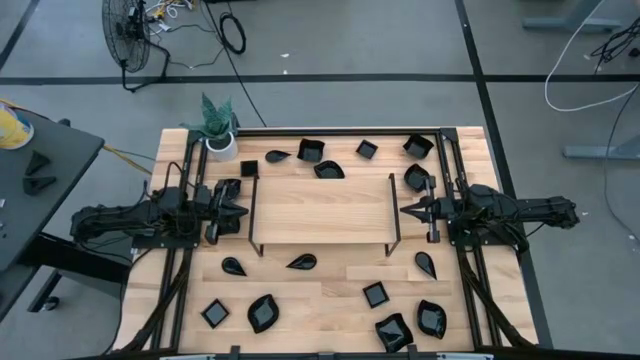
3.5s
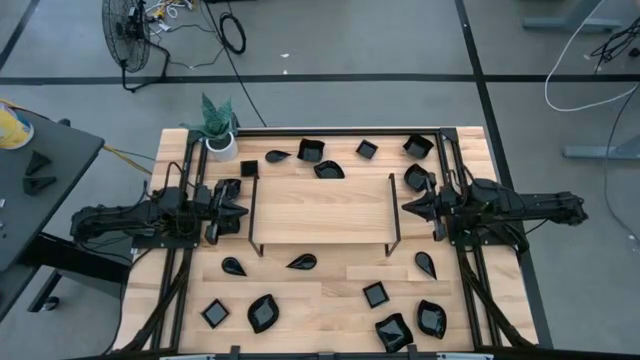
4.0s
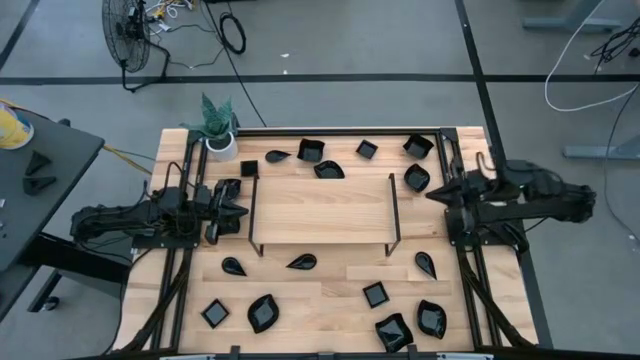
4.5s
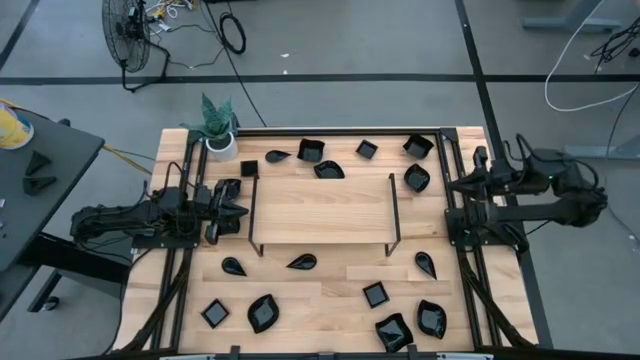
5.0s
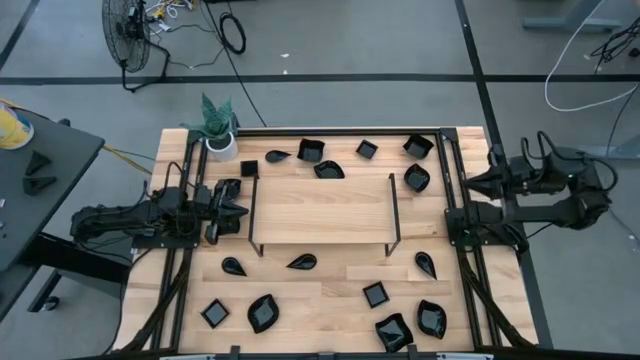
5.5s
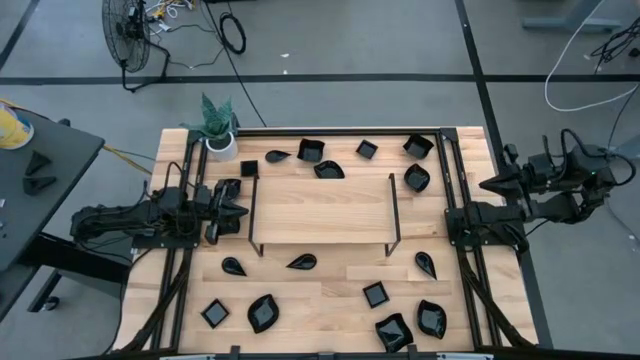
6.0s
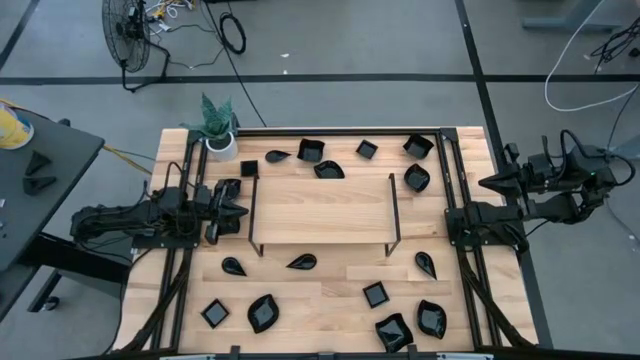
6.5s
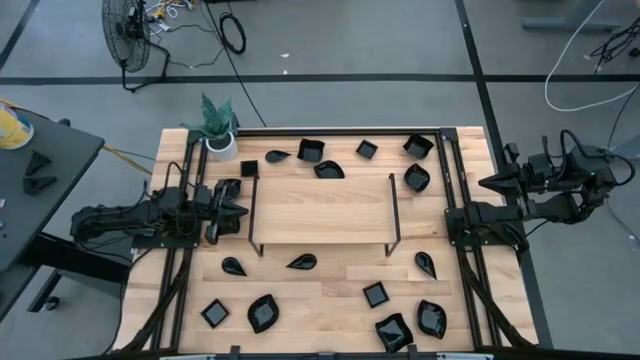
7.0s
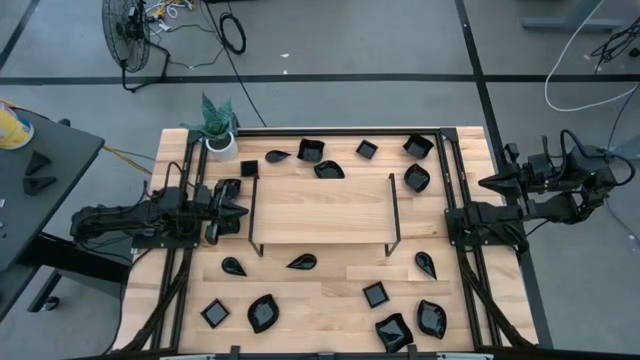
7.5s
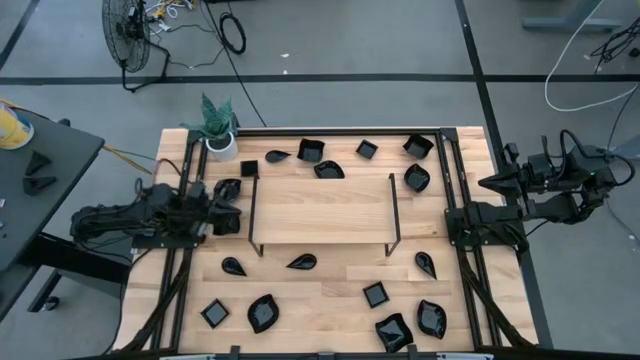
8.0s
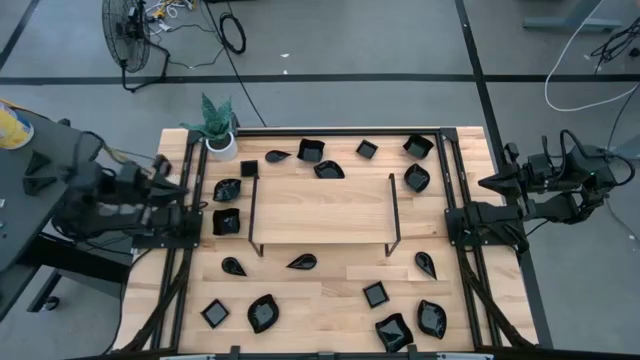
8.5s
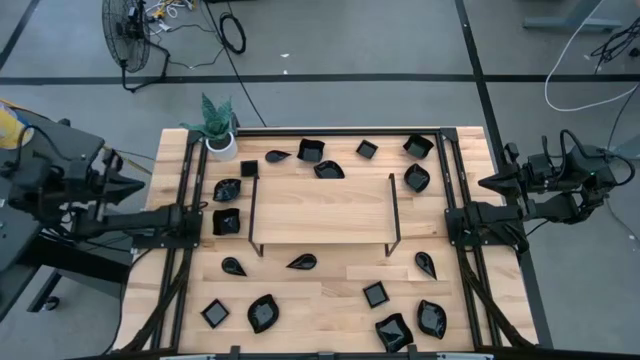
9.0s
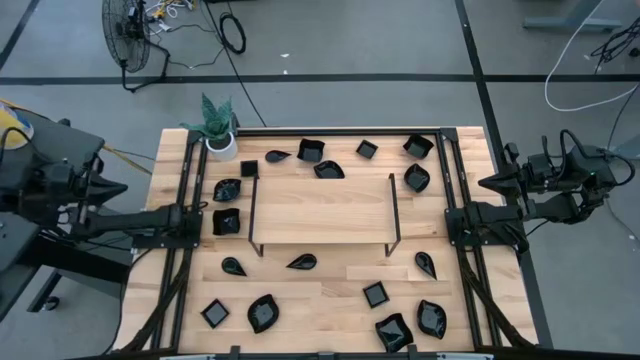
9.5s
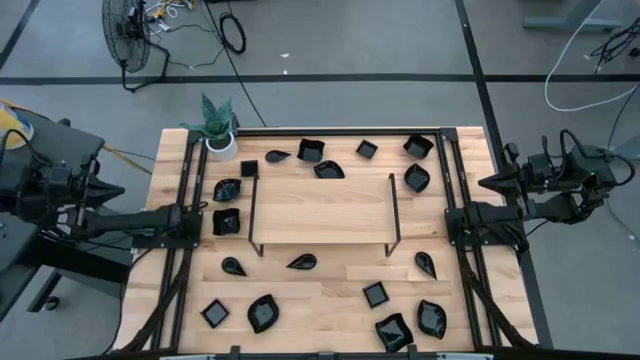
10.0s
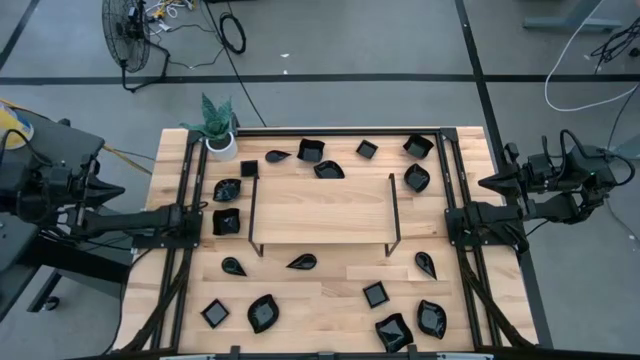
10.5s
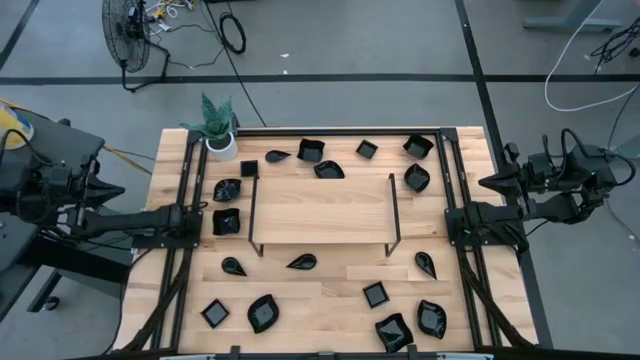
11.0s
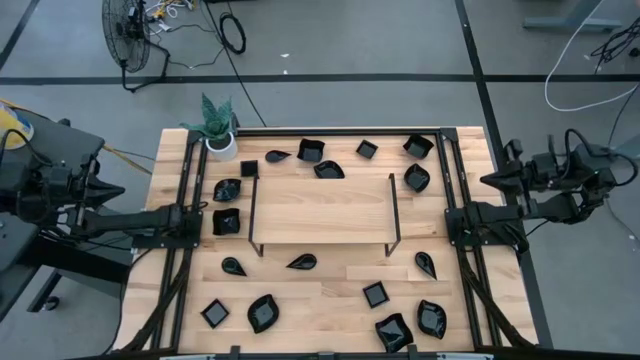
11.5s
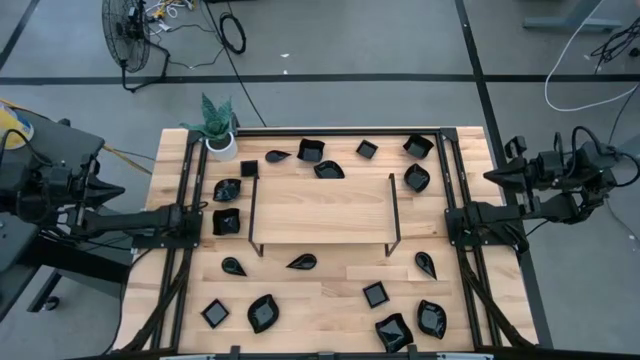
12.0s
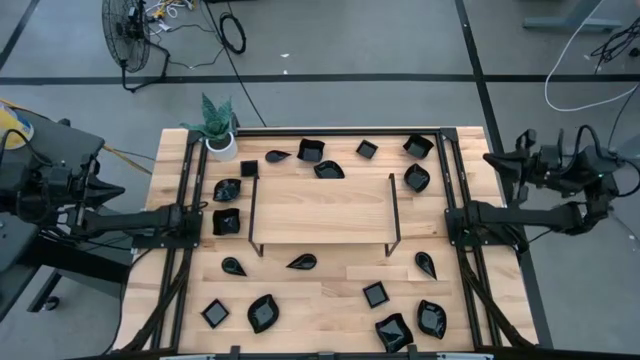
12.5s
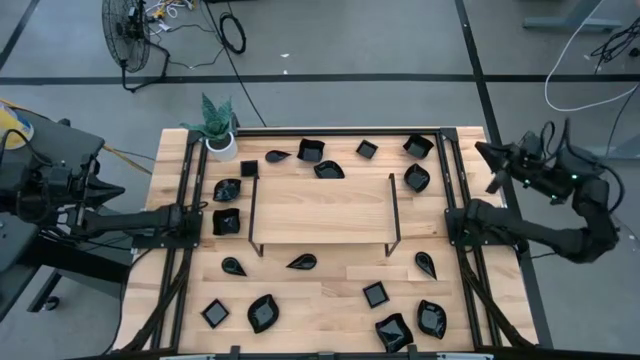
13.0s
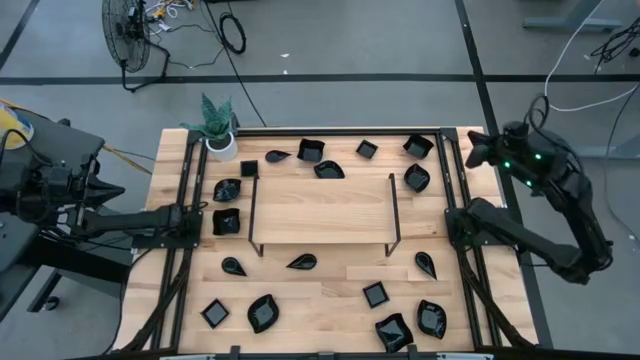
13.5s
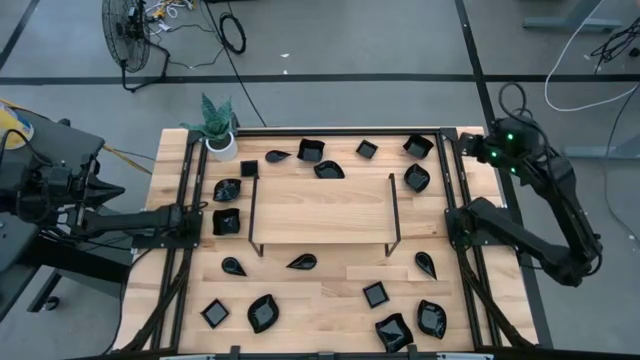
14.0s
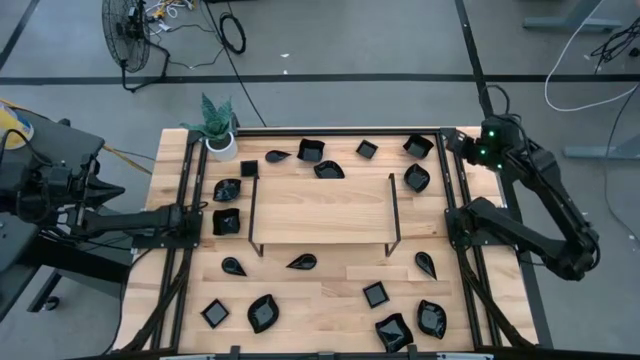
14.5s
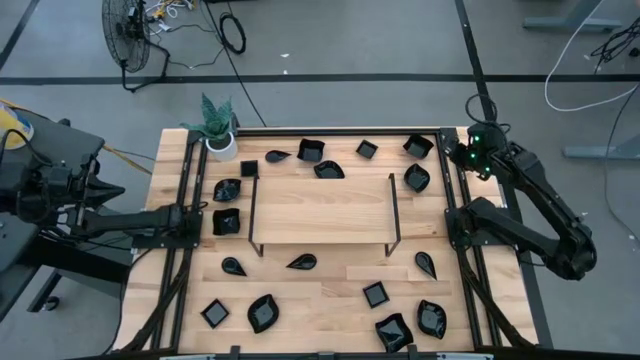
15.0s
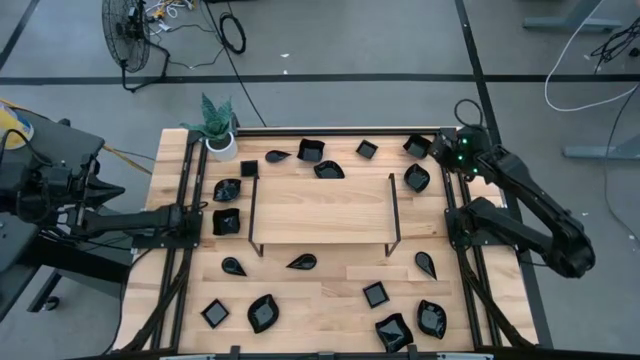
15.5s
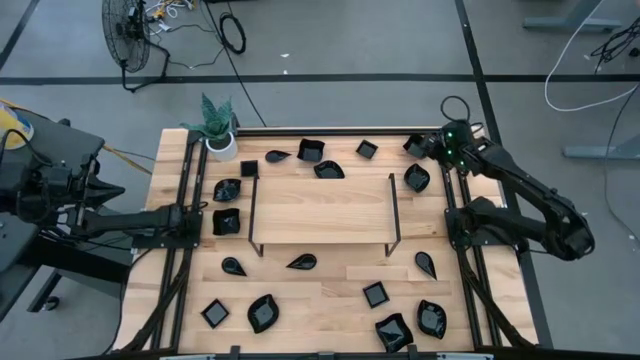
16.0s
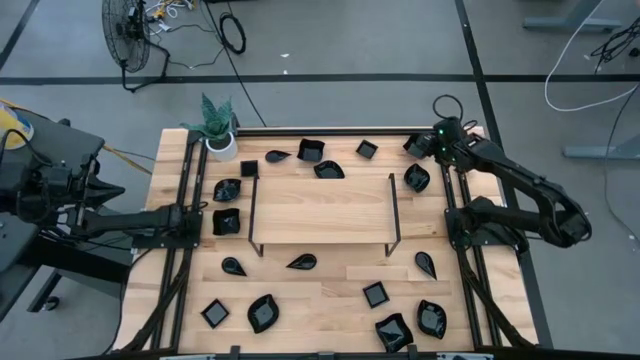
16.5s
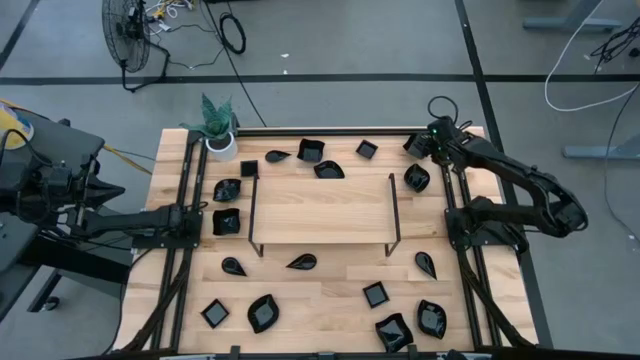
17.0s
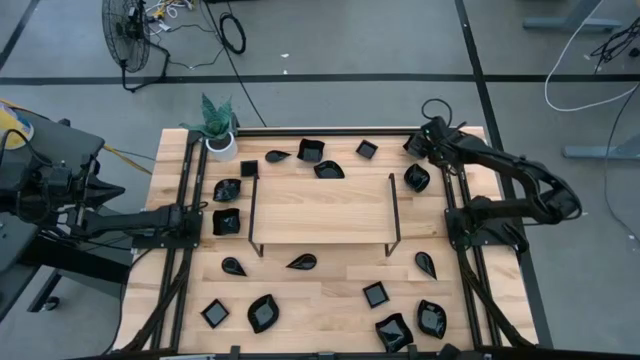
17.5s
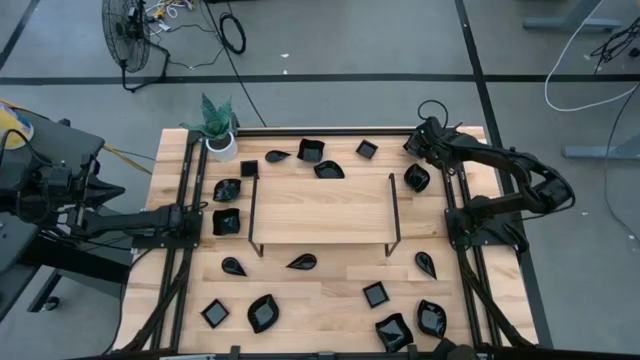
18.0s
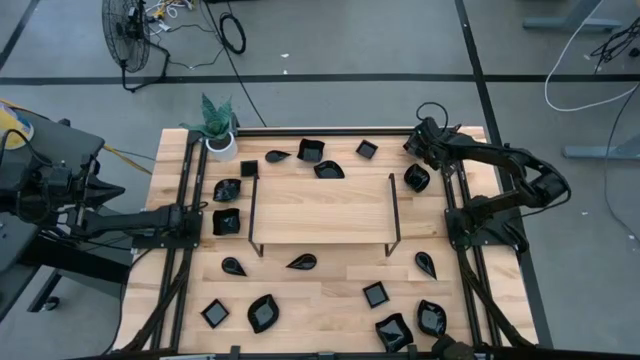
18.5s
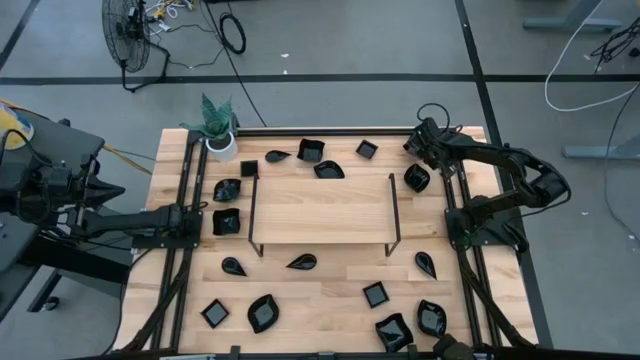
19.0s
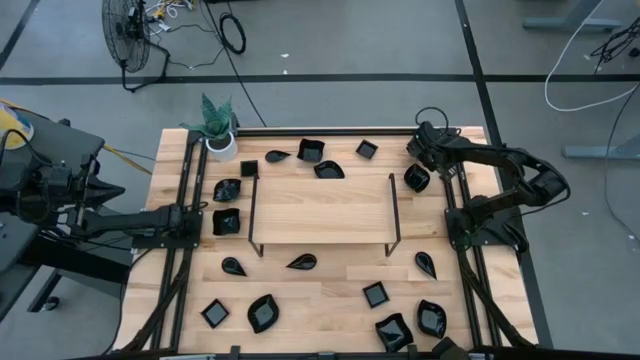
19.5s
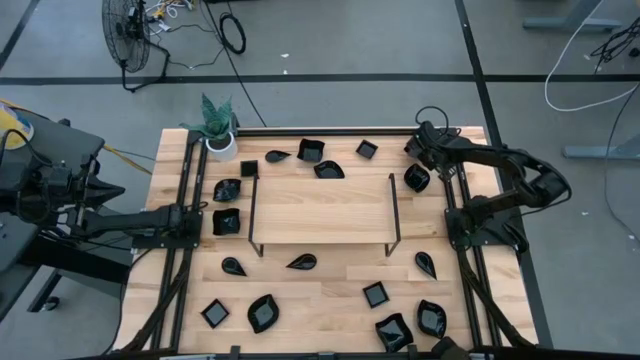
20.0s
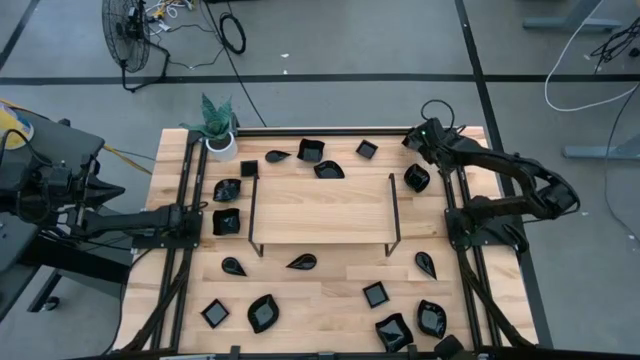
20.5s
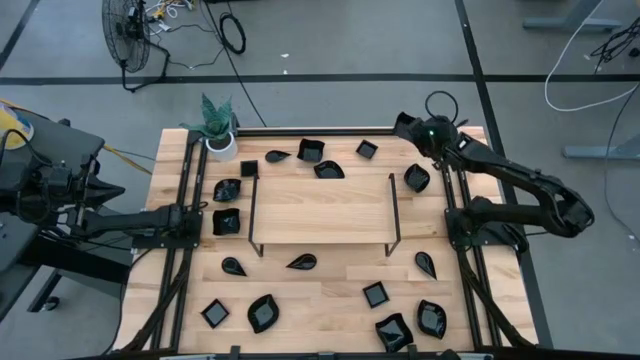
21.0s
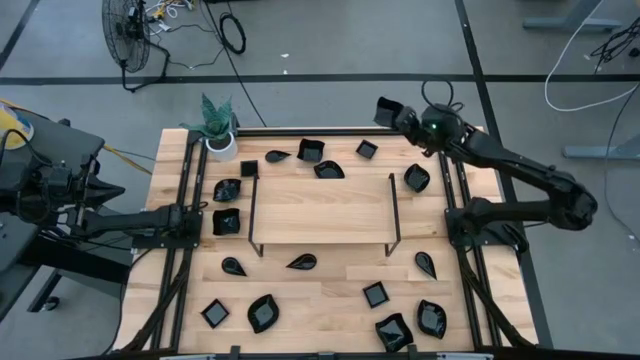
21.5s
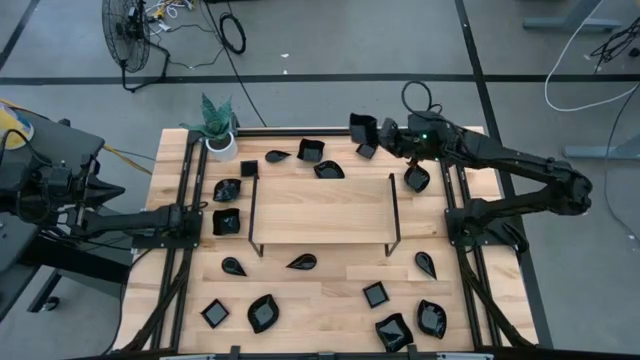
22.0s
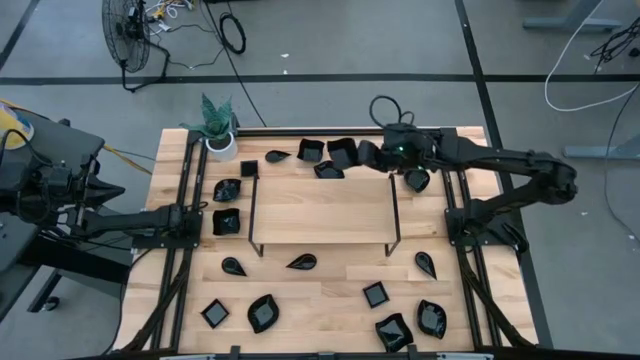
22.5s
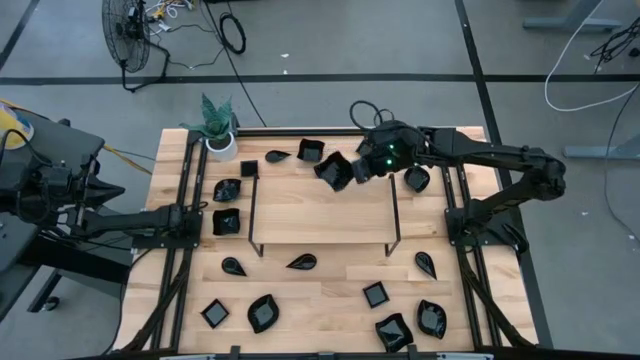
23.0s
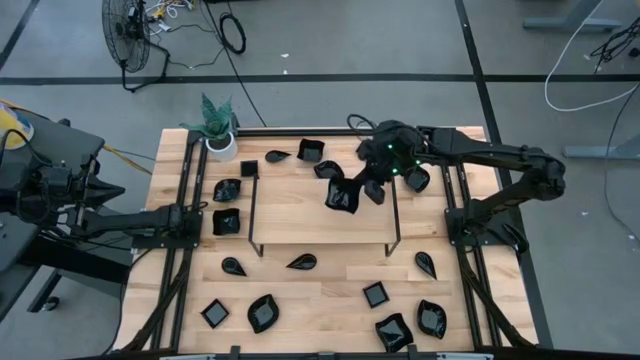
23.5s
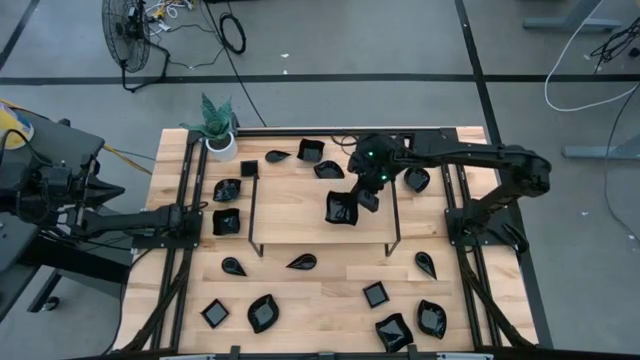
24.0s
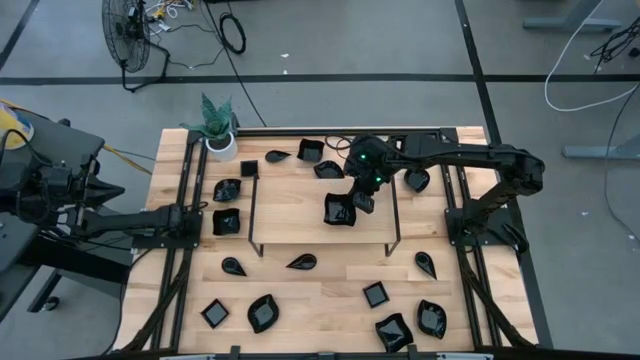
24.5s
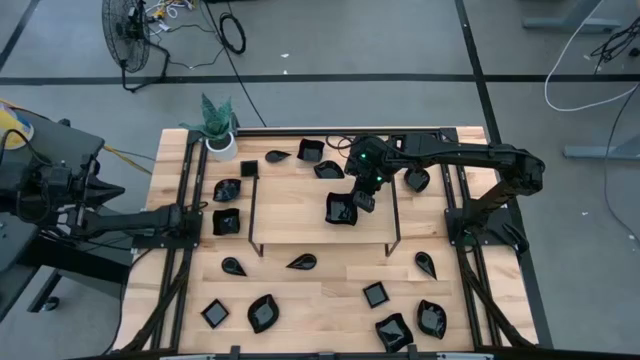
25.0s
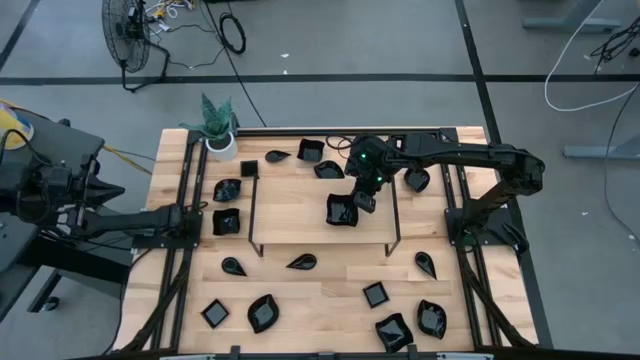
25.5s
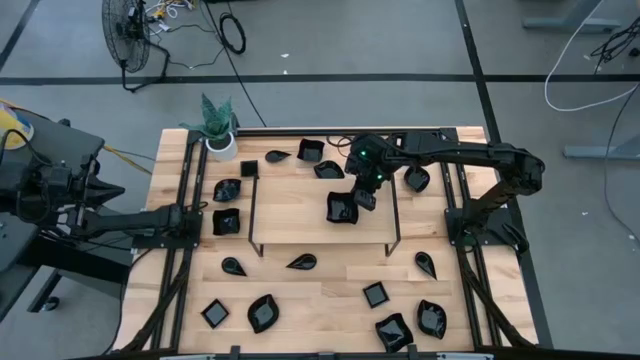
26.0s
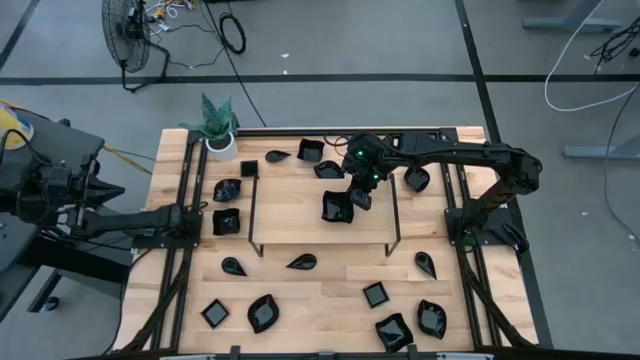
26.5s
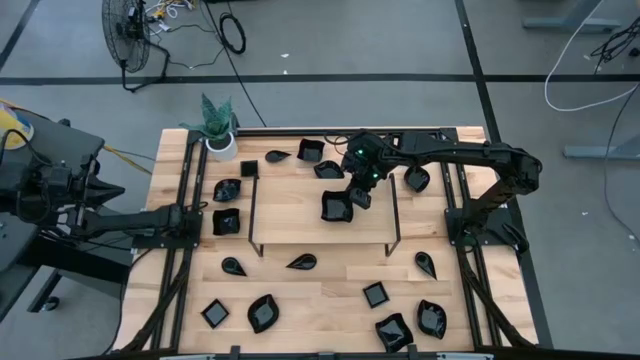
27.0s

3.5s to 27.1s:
Task: Pick & Place Mini shaped plates
Put the distorted square plate on the shelf
